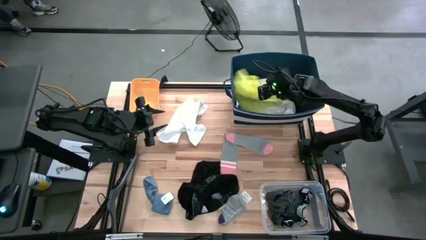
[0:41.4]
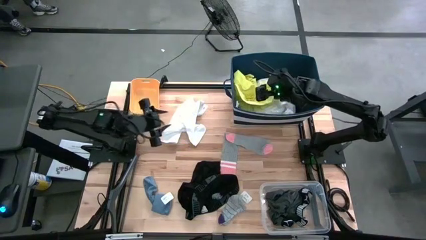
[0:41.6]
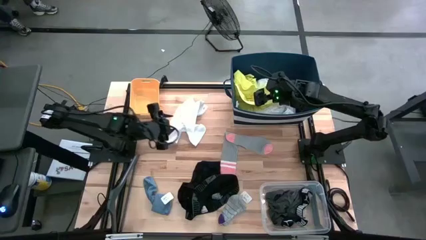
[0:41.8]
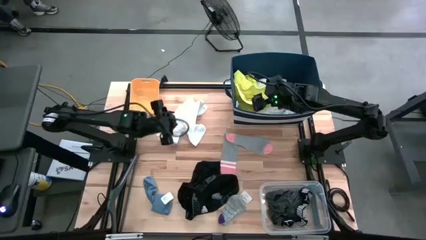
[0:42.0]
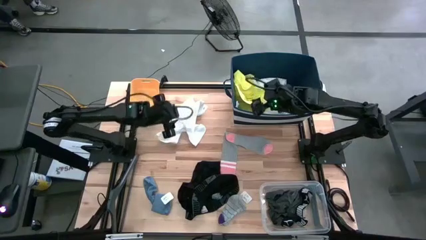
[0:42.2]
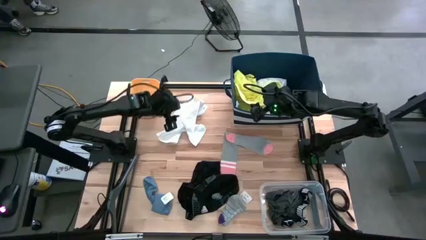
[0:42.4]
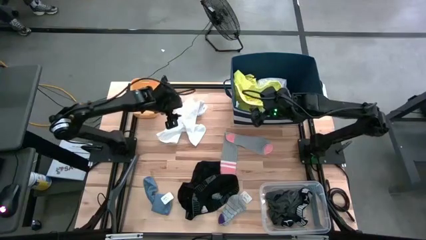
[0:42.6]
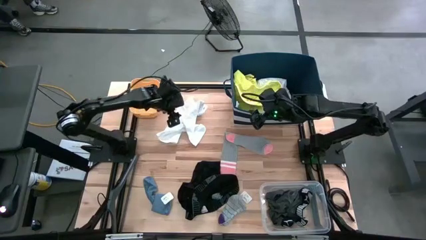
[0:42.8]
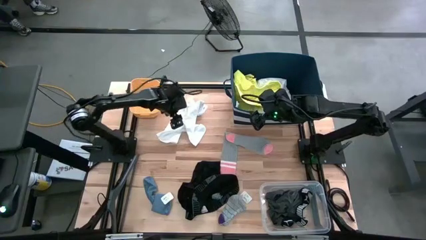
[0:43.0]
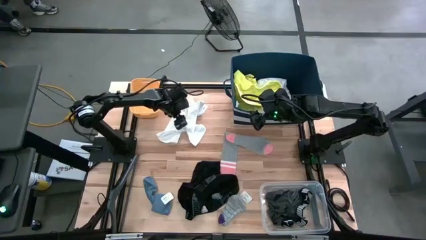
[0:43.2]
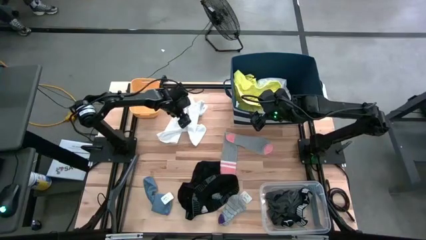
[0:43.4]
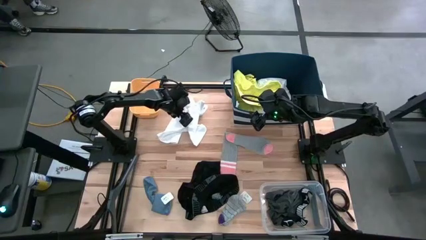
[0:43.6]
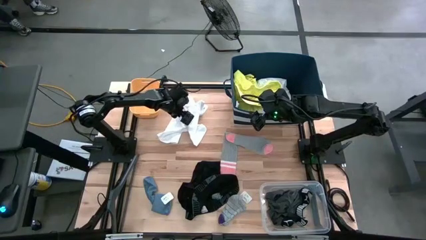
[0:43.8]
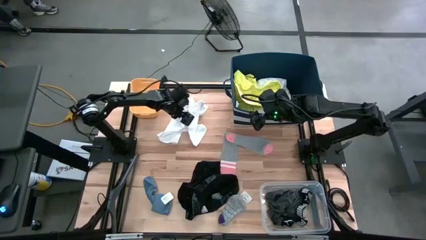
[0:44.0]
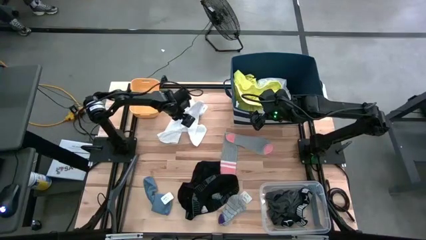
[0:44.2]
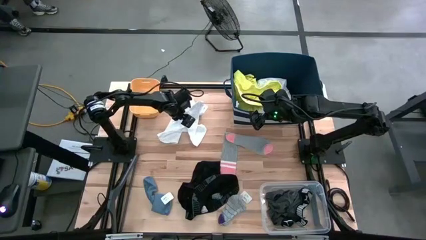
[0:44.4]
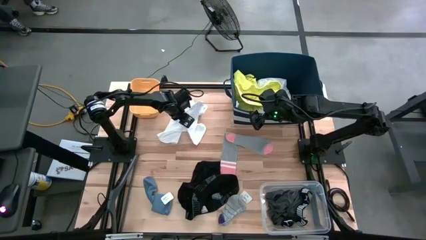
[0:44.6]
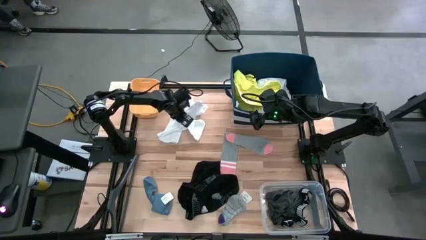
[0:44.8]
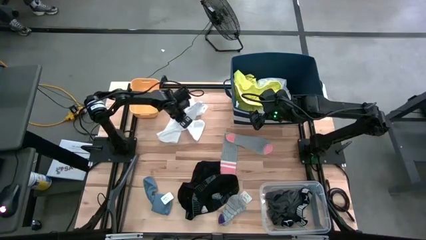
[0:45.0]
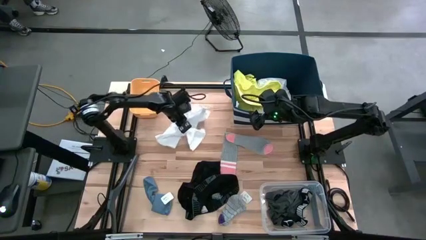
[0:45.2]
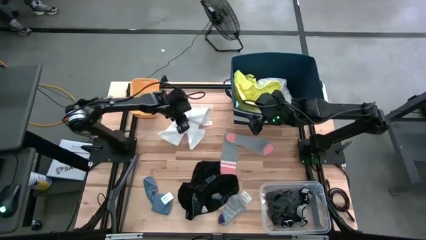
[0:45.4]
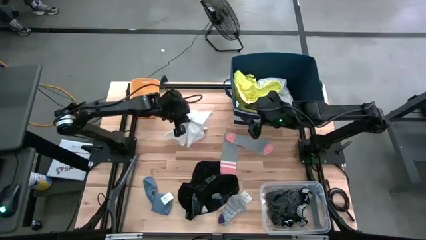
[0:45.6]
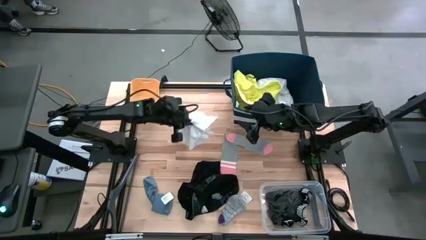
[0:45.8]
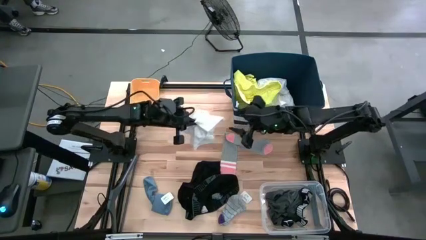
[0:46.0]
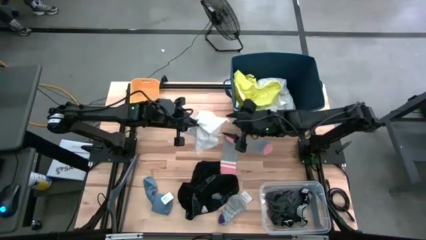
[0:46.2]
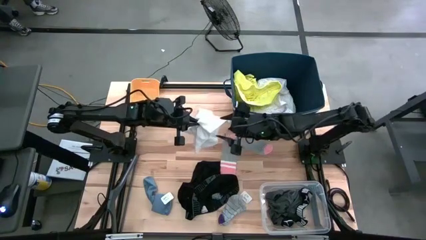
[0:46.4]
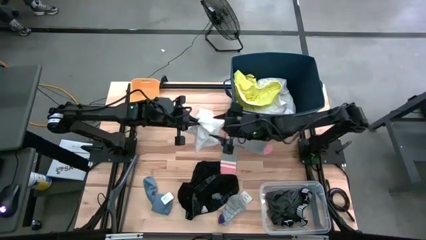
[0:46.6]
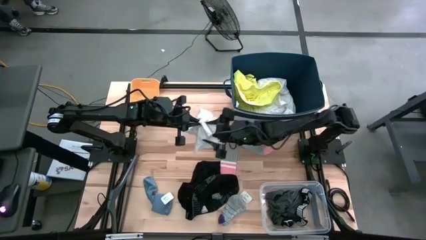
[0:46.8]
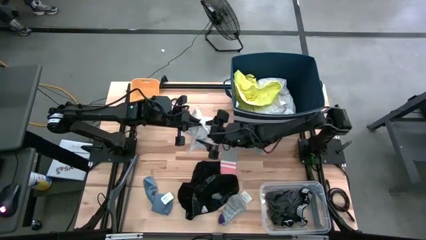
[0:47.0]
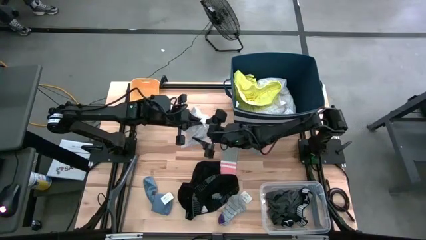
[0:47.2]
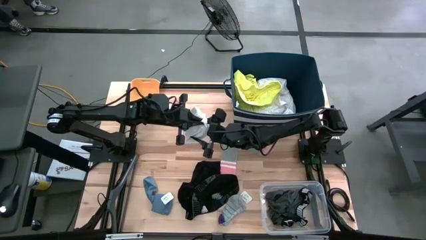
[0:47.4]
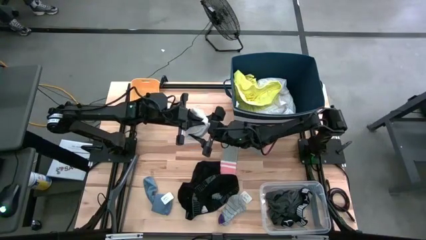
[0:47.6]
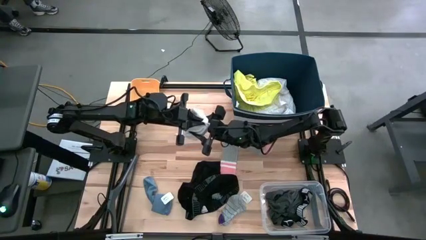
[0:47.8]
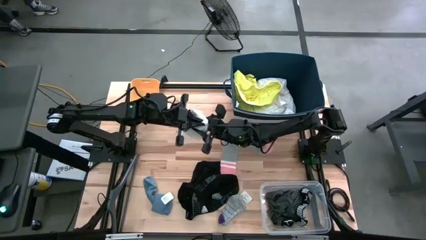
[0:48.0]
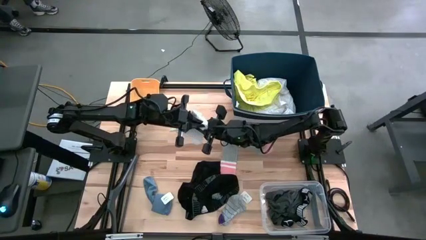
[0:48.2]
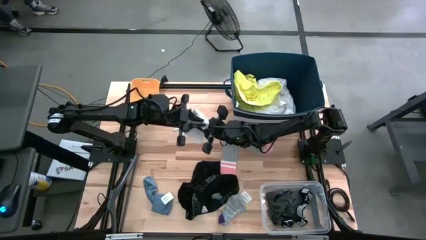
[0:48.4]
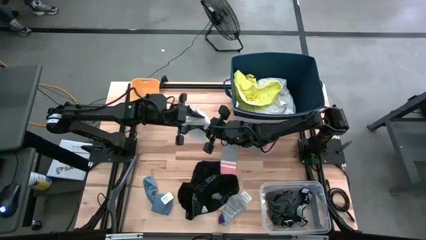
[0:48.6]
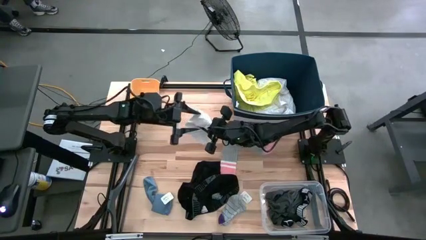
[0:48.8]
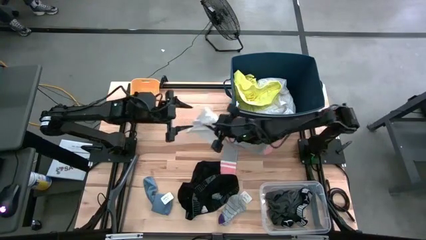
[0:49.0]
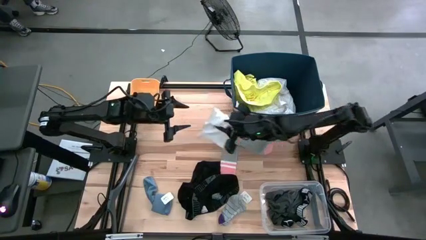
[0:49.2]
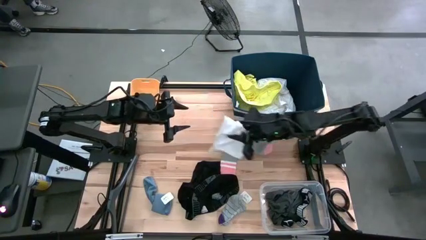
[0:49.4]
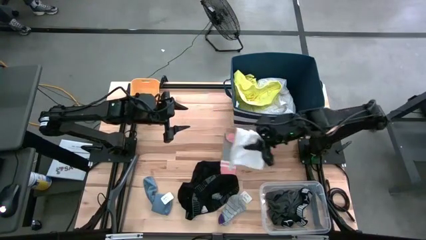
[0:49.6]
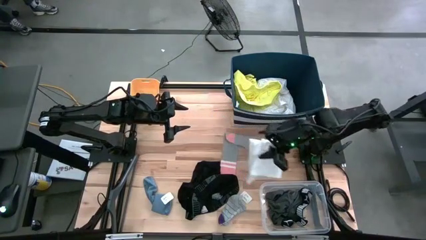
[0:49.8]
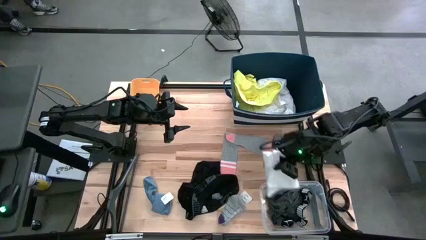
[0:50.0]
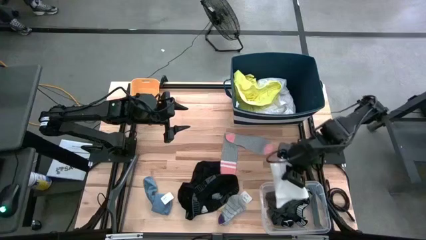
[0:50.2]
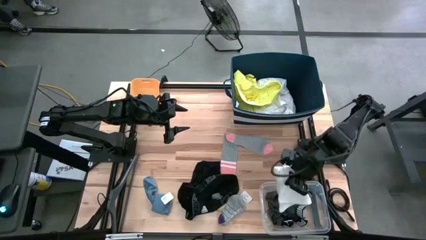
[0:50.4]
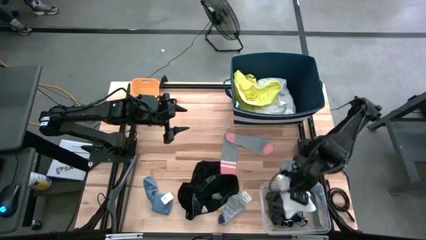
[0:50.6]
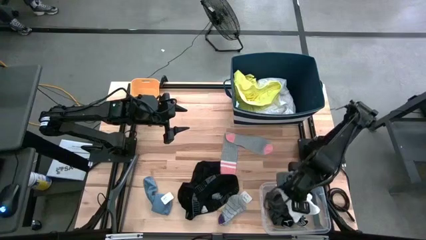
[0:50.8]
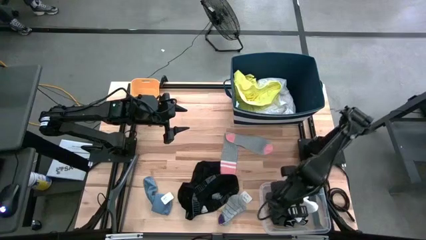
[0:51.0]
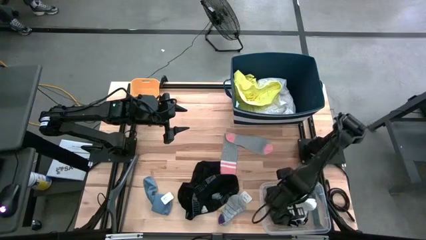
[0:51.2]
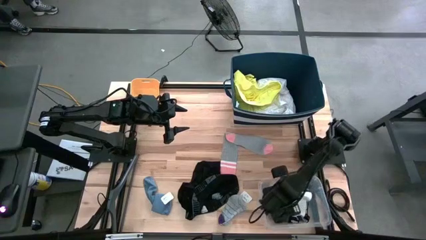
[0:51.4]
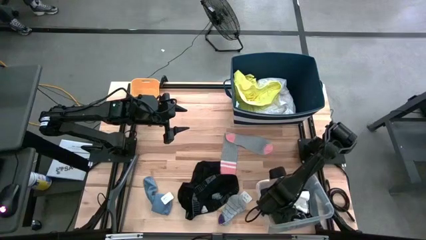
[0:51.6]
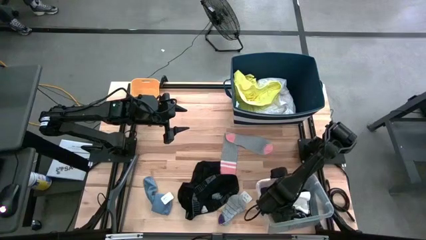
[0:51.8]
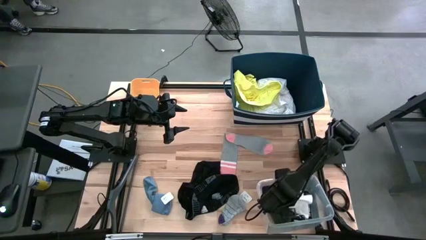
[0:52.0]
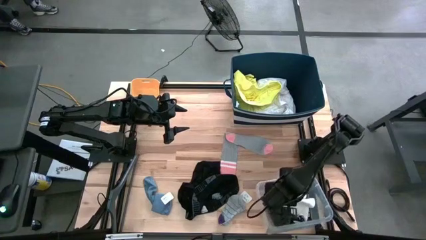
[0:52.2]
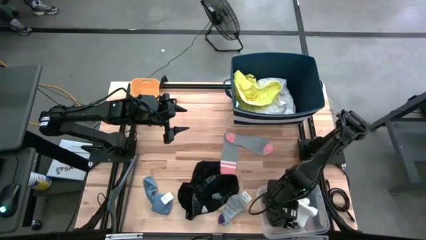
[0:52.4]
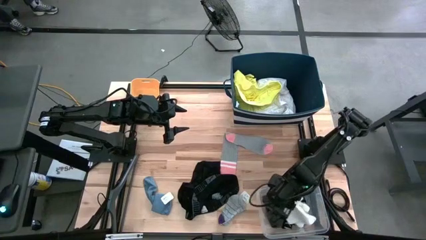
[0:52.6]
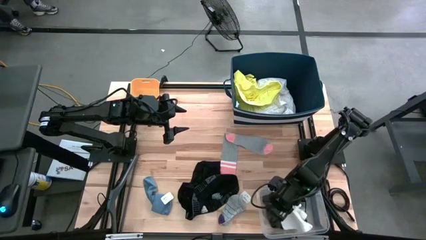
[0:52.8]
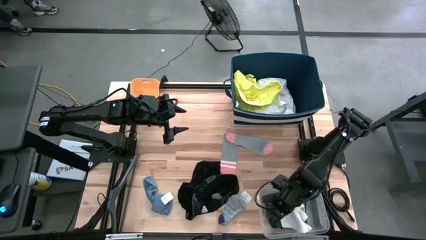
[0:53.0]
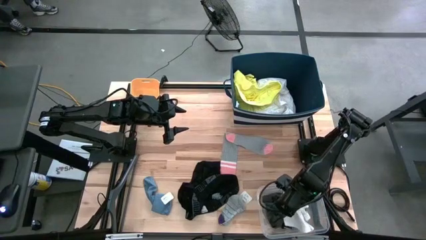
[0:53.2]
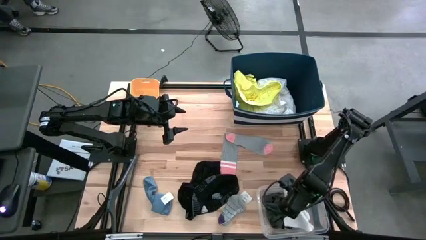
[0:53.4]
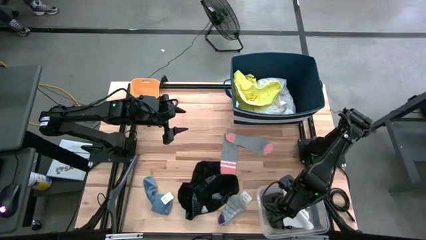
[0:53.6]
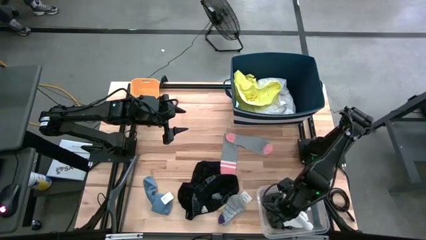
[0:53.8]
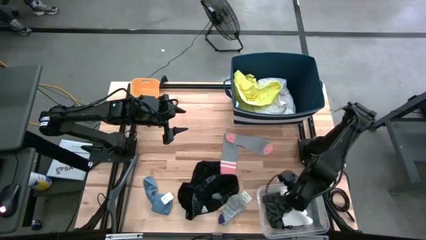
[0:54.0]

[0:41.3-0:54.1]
Task: Pick & Place Cloths
Put the white boxers into the transparent bin
